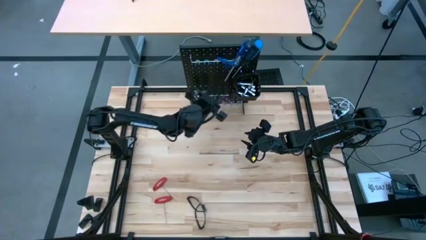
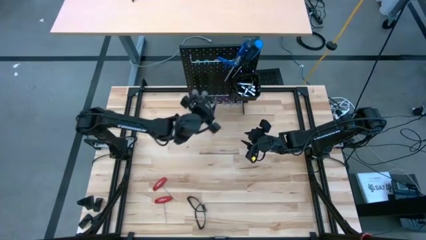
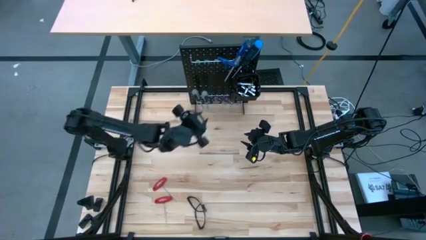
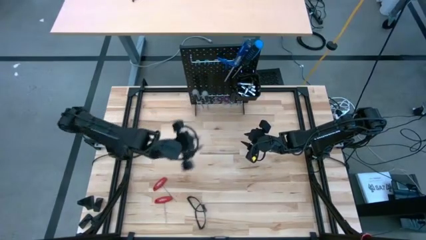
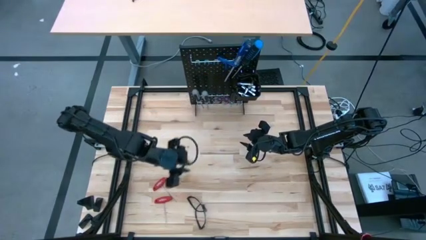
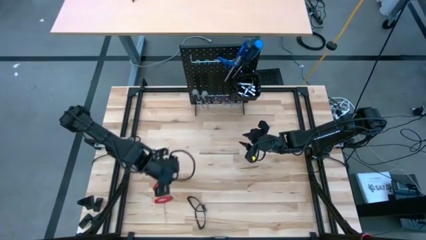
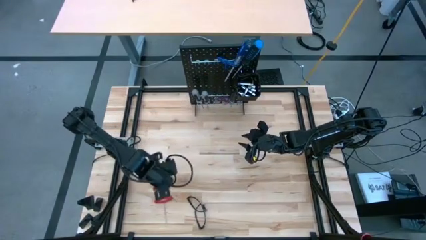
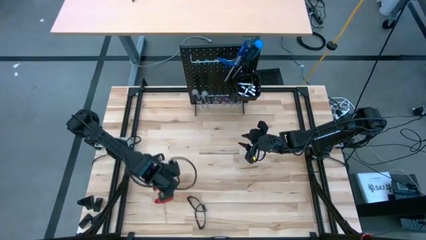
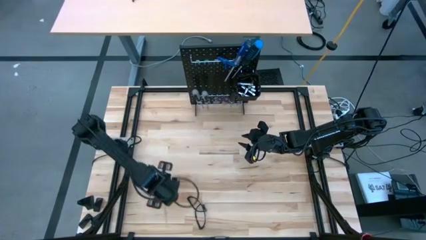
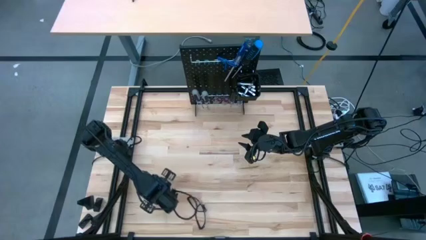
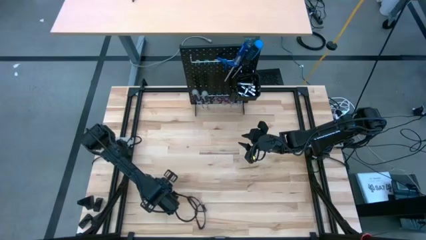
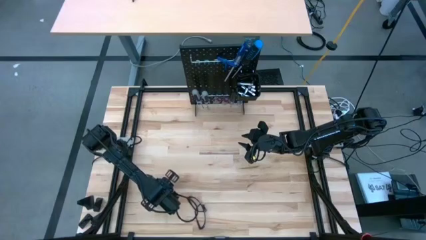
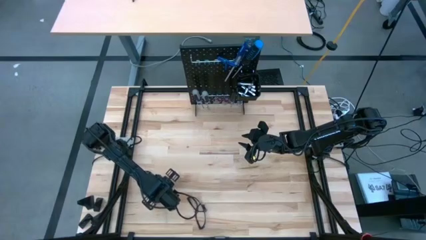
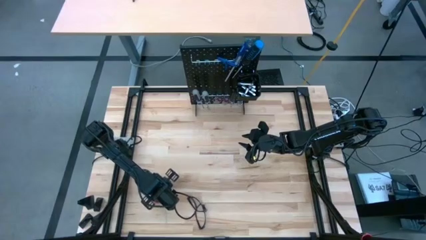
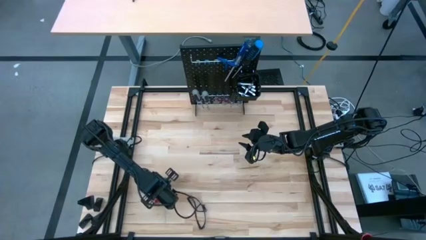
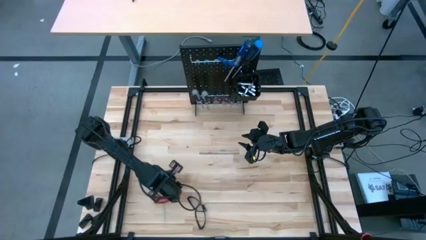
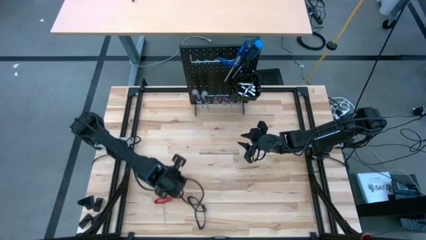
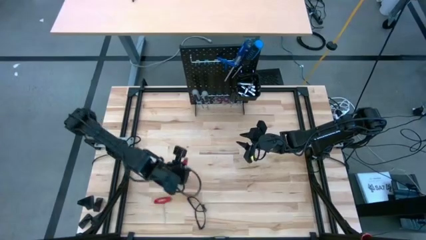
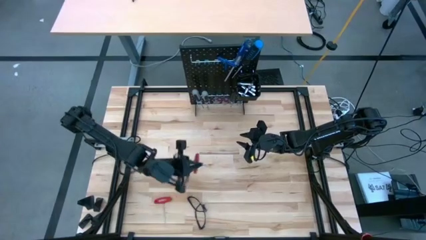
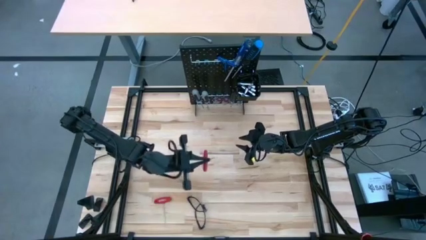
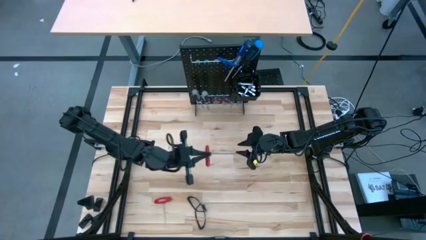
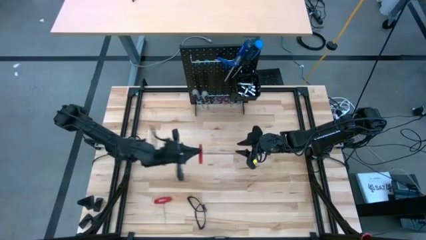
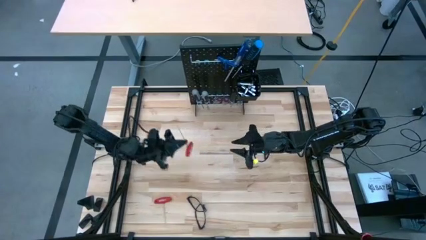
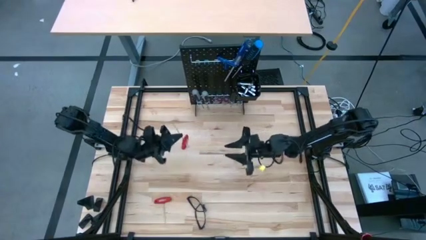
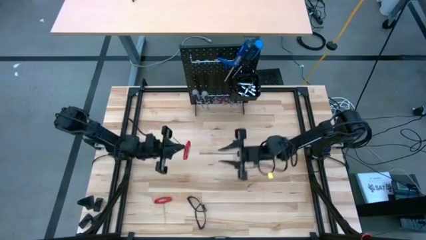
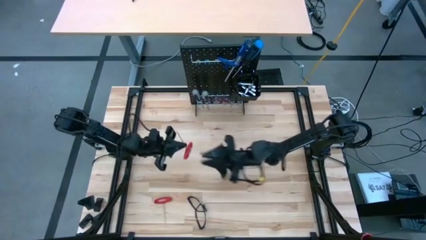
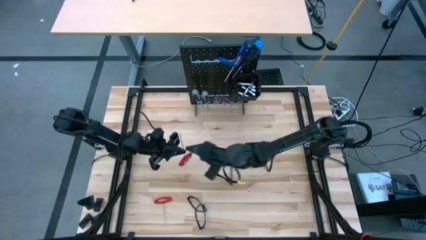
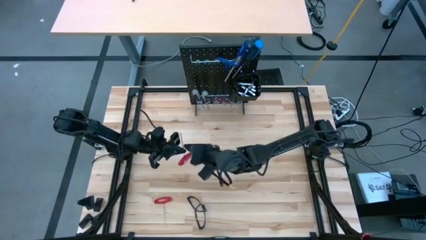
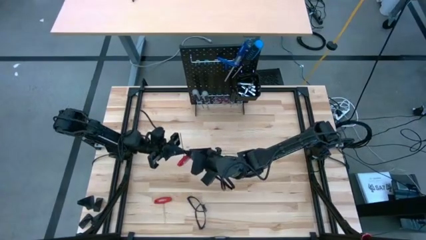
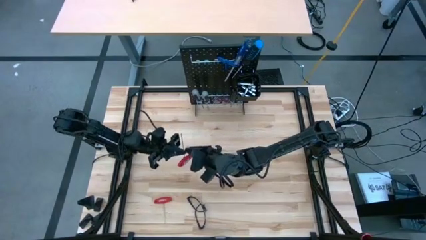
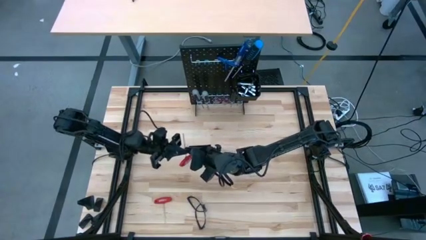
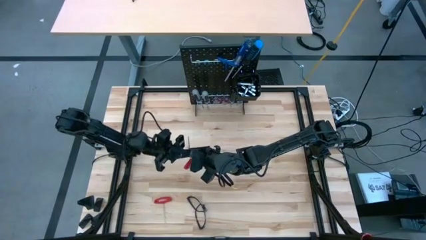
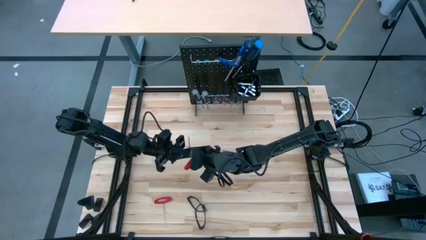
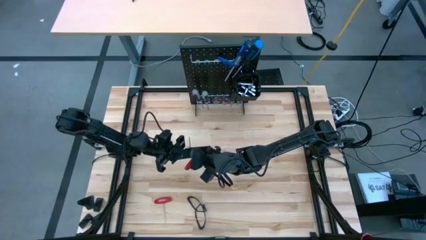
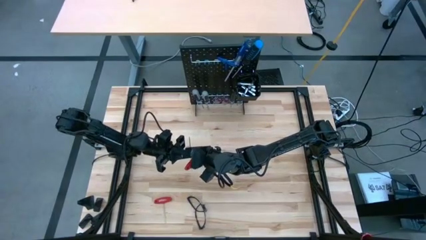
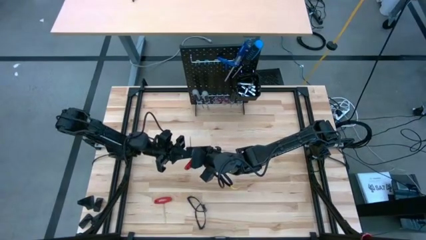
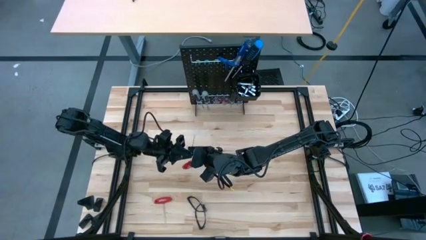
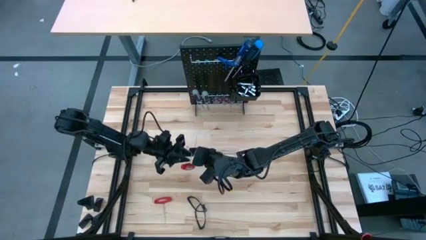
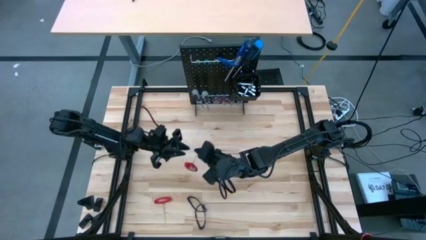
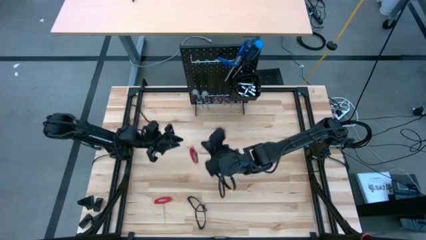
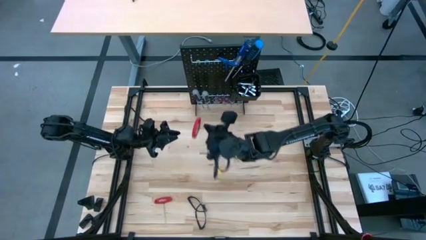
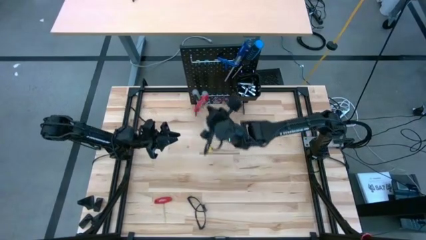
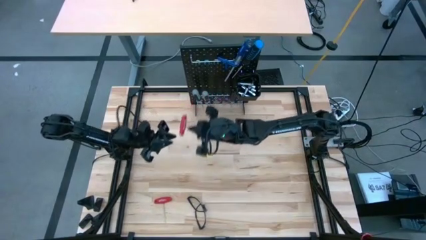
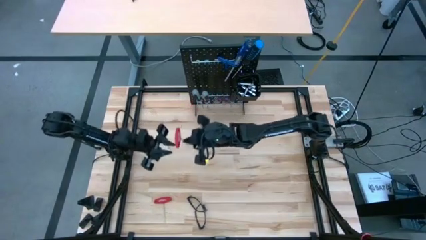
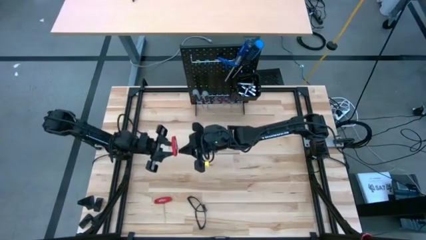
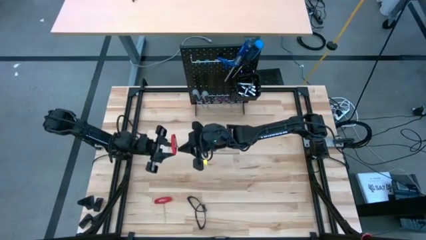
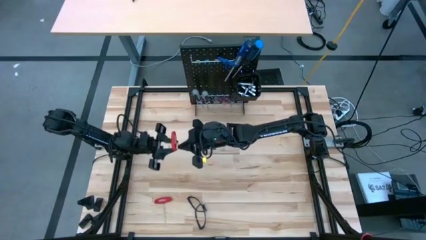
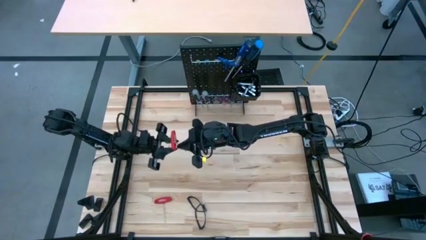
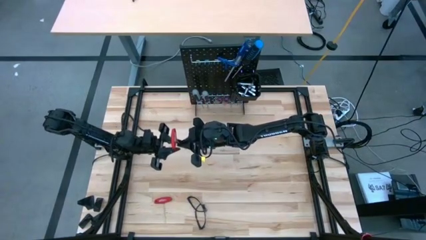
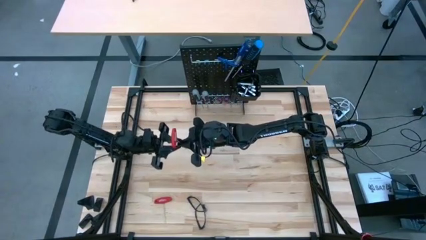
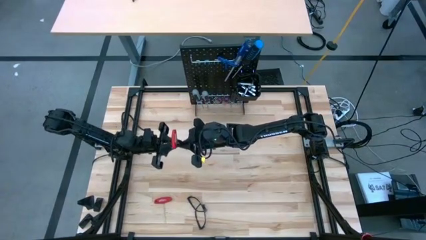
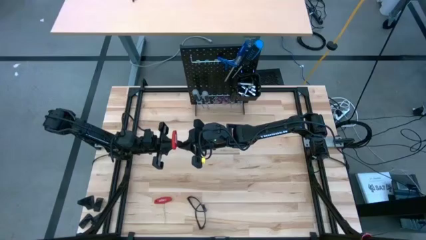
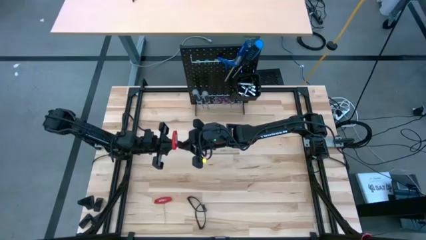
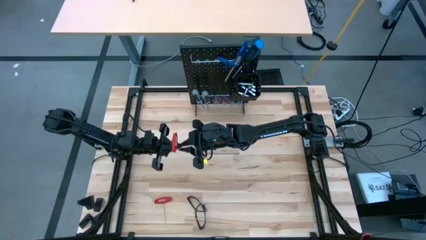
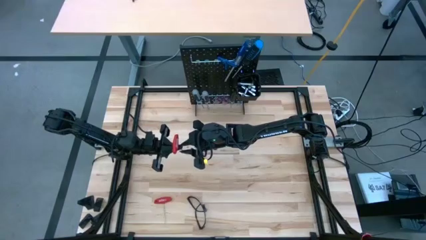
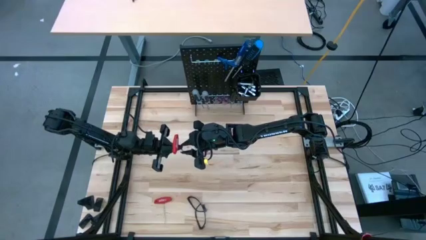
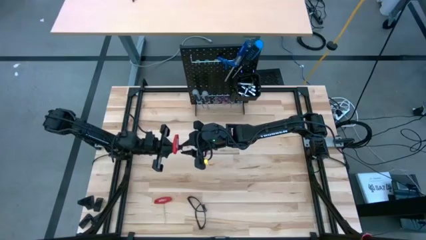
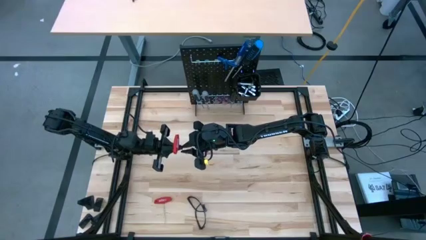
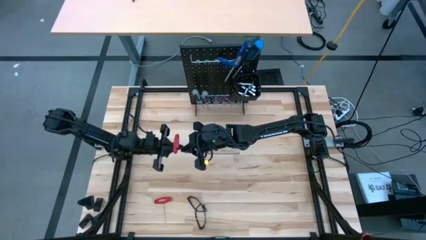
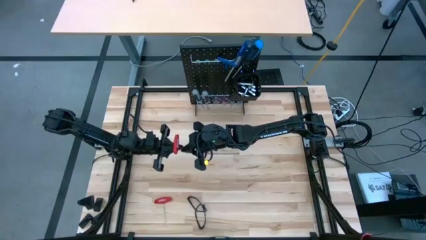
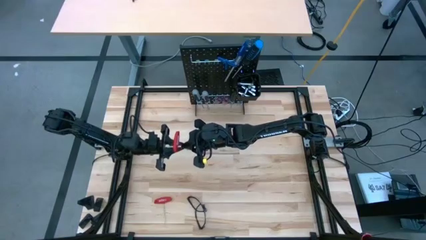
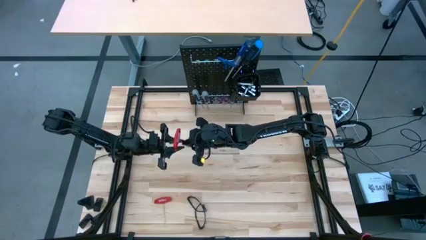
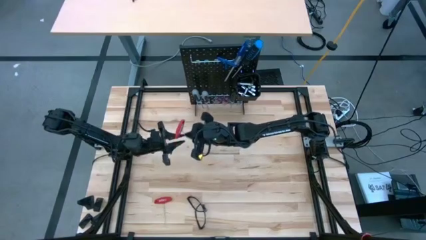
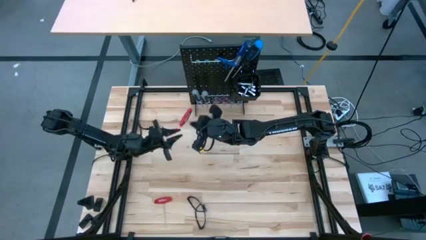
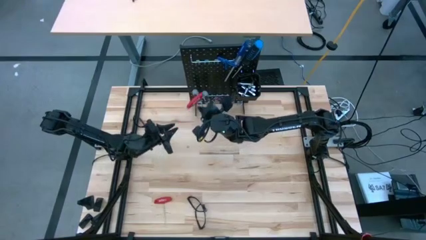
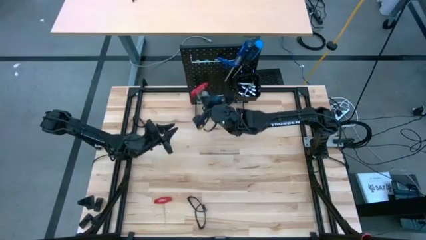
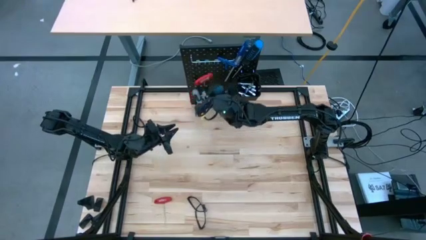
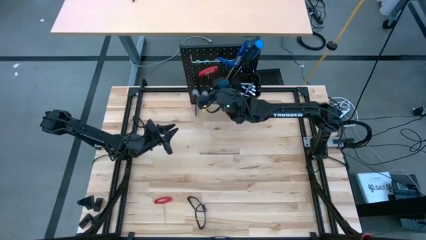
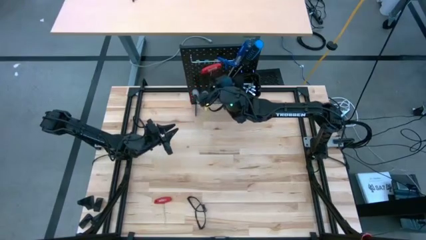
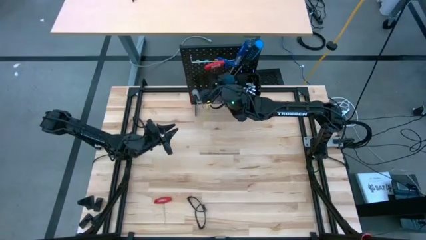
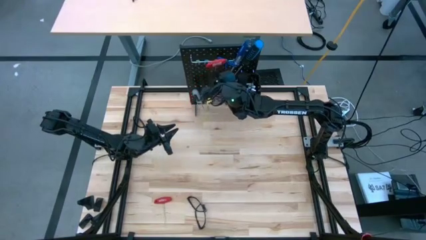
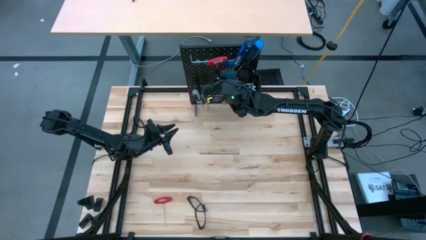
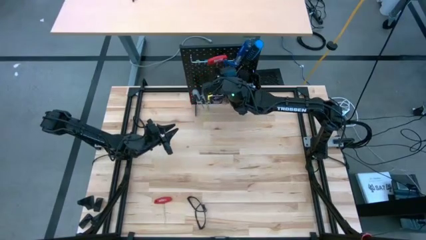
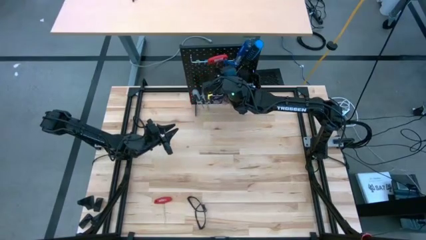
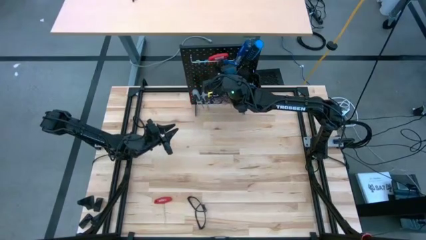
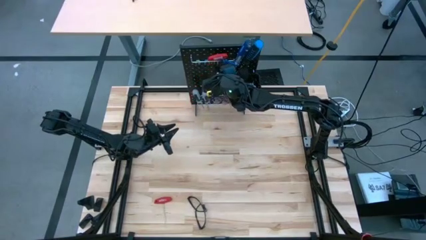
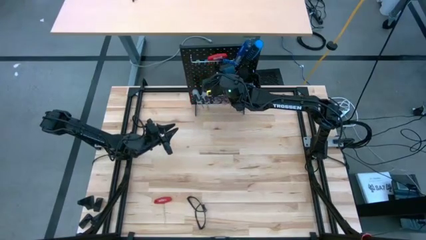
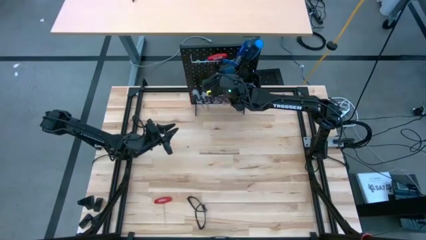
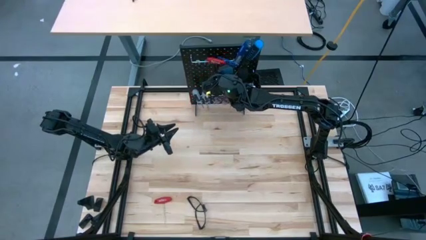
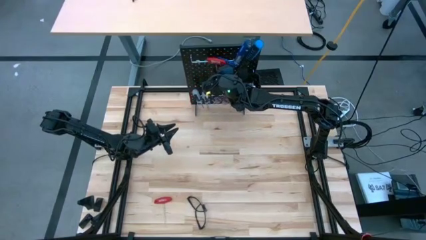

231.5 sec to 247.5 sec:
Task: Hang tools onto peg board
Hang the allen wrench on the pegboard

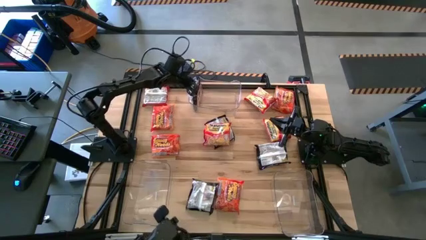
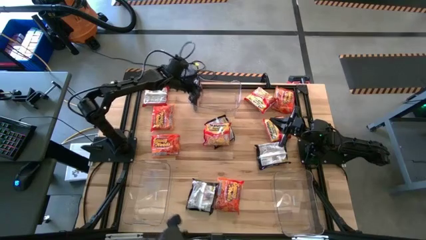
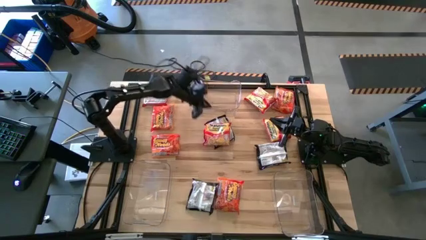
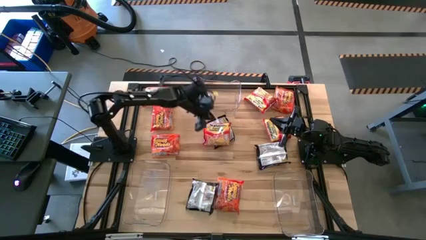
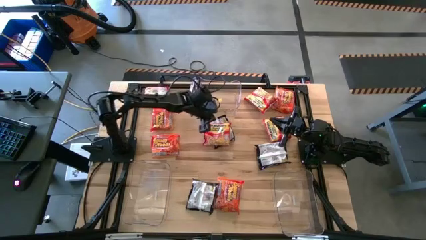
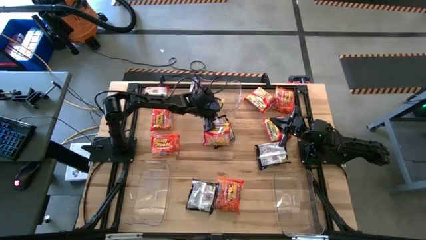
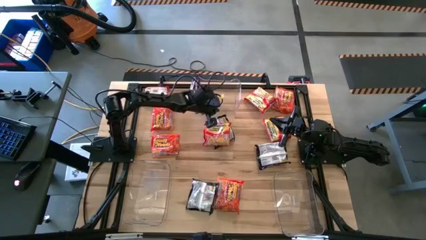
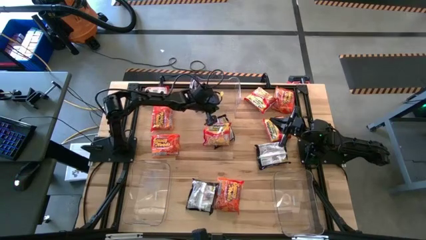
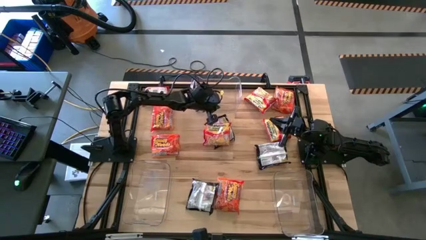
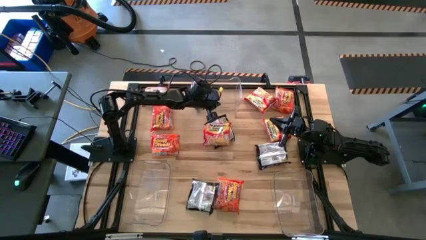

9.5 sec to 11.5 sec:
Task: Sort Maruchan noodles
Adjust the top transparent bin
